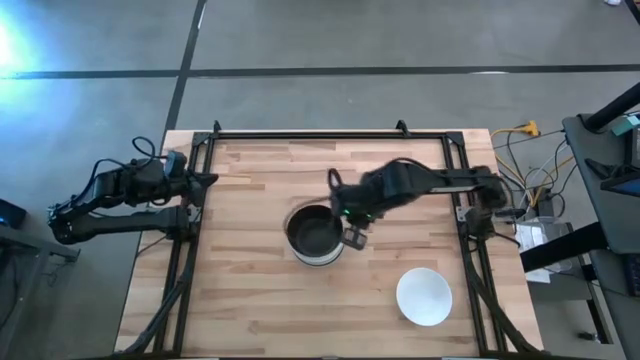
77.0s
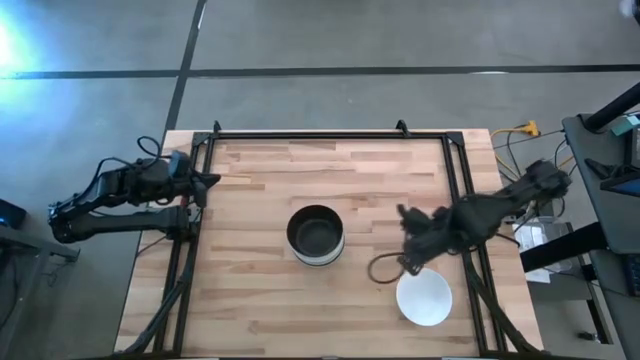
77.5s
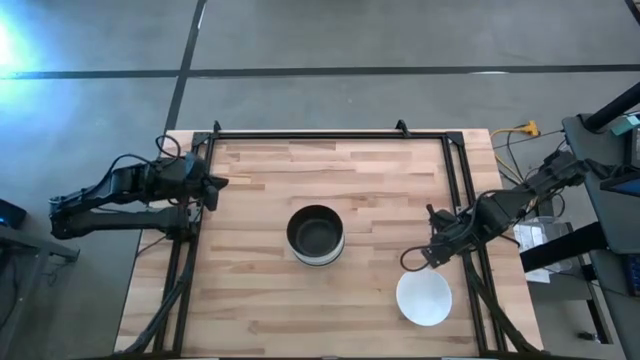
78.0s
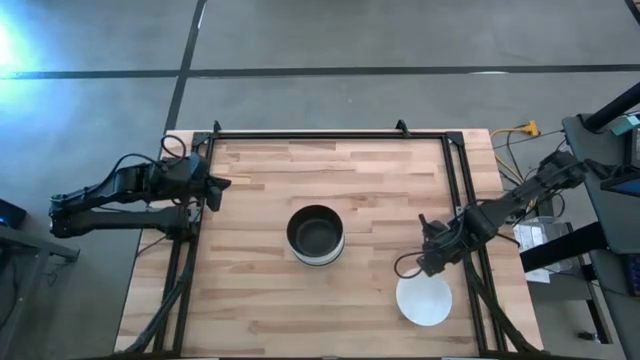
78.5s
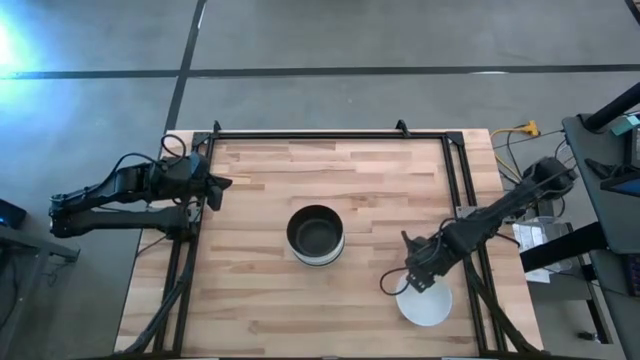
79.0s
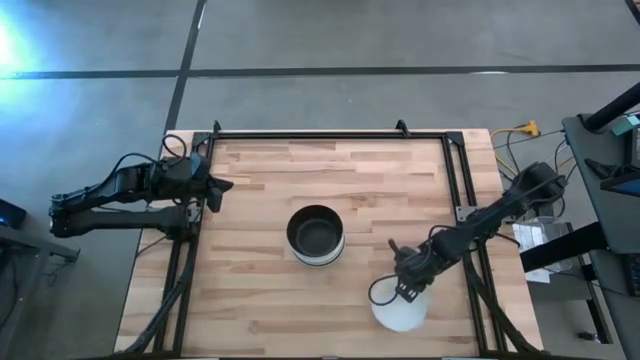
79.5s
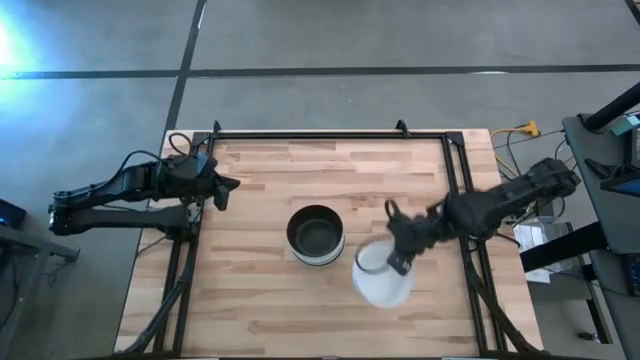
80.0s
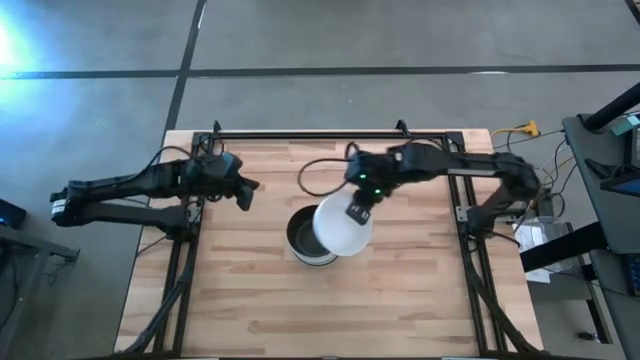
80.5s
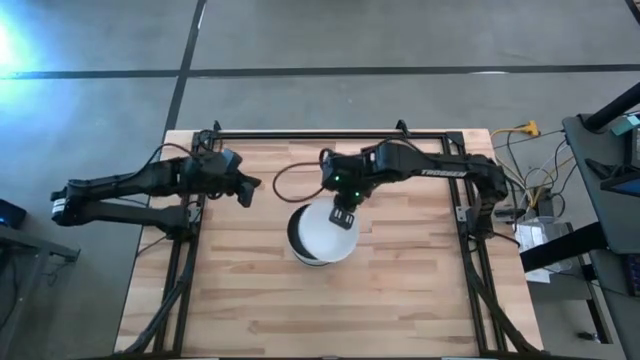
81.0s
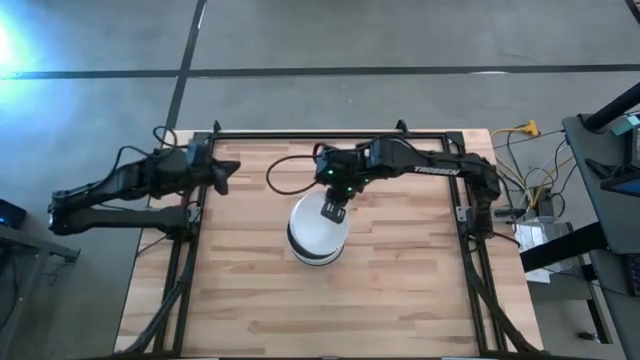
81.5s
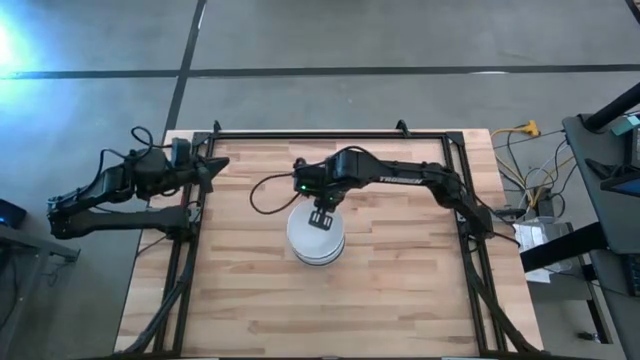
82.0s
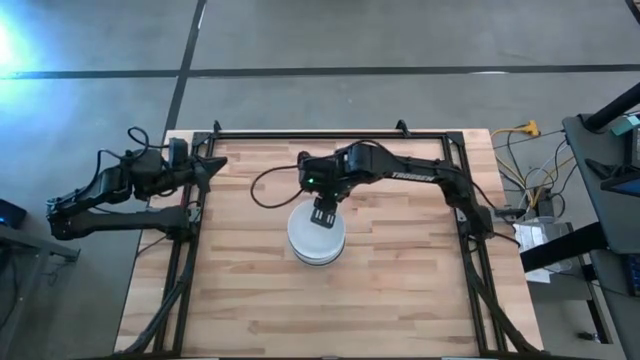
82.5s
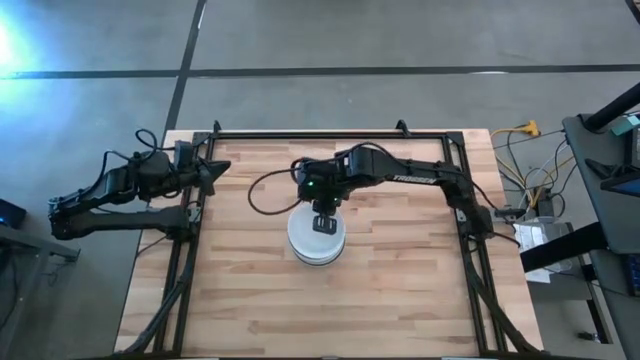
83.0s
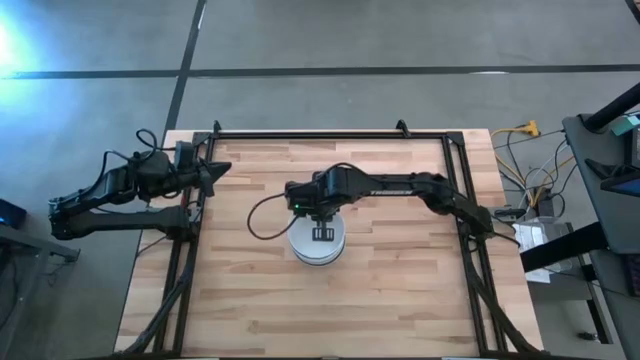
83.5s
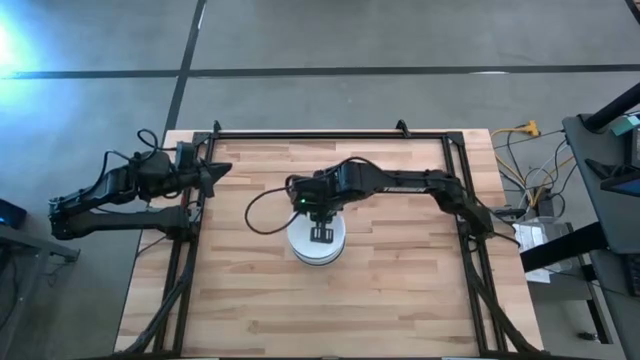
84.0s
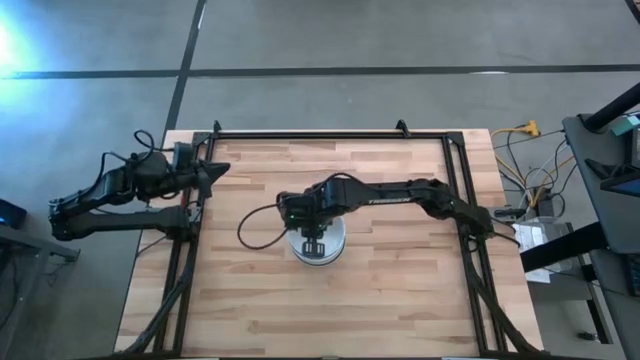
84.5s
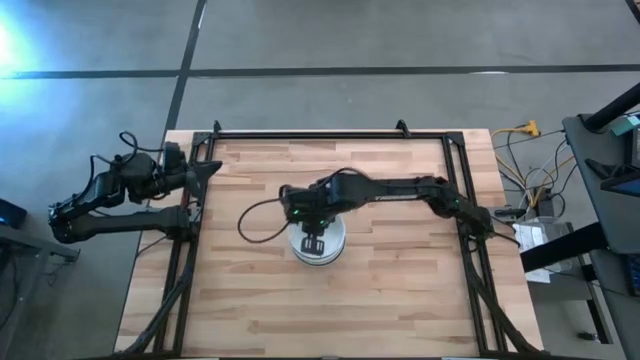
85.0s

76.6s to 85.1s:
Task: Nest bowls inside each other
Stack the white bowl on top of the other white bowl

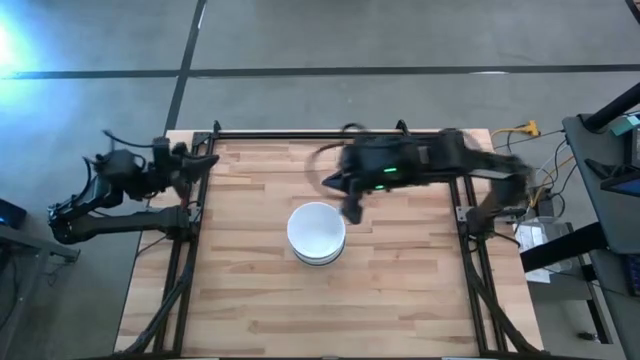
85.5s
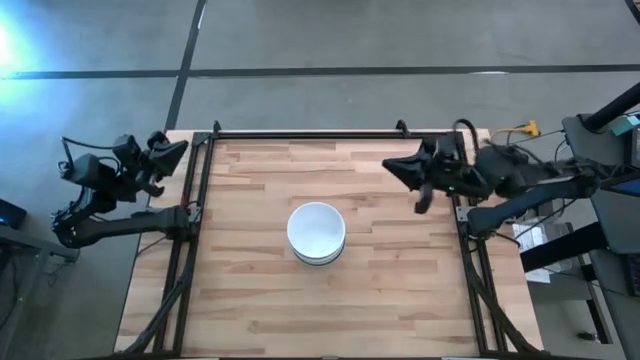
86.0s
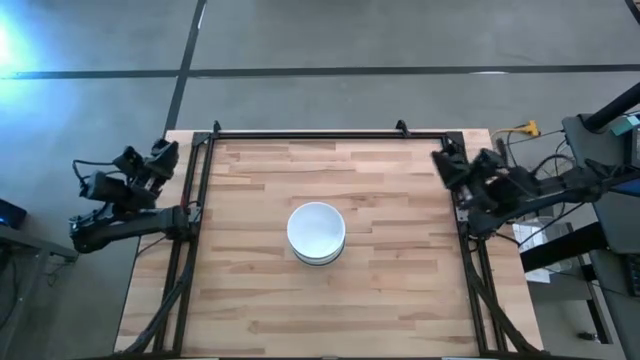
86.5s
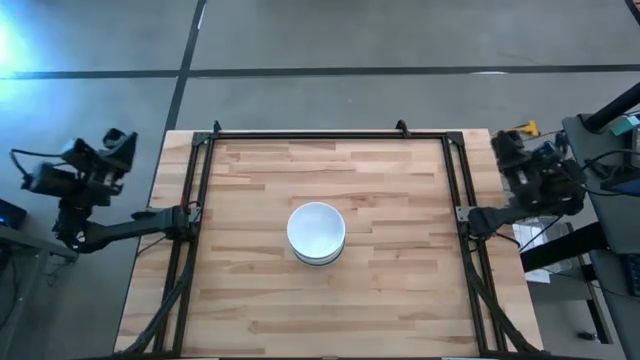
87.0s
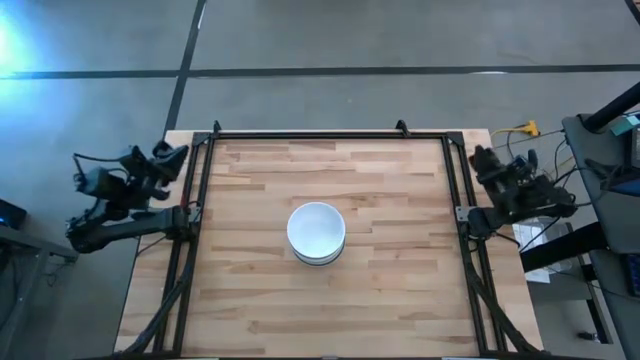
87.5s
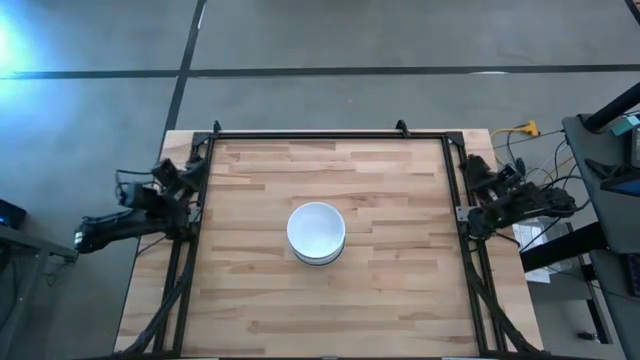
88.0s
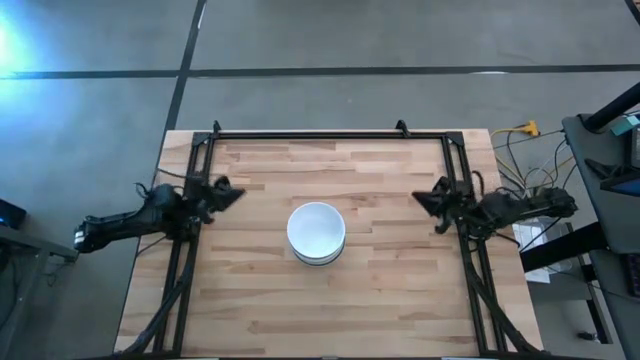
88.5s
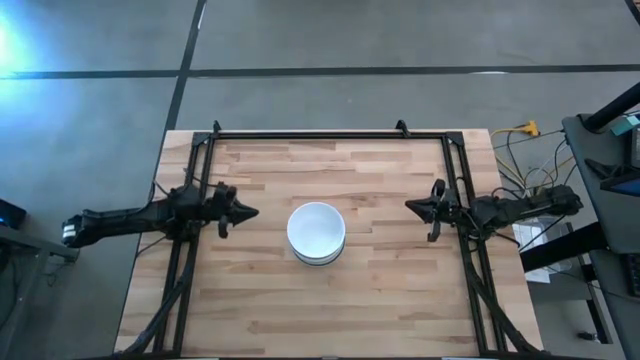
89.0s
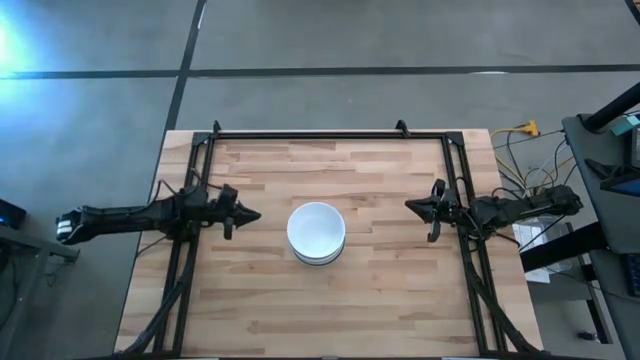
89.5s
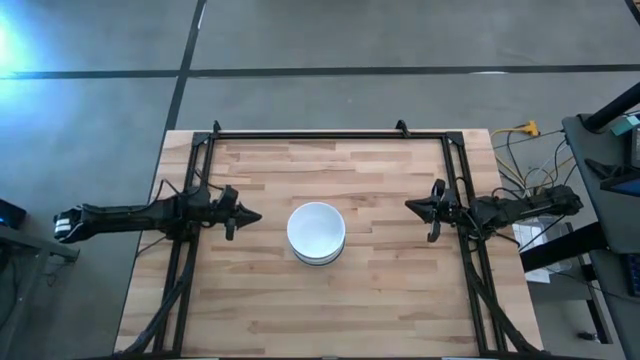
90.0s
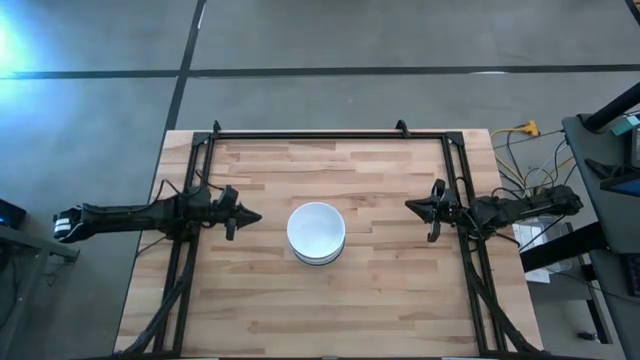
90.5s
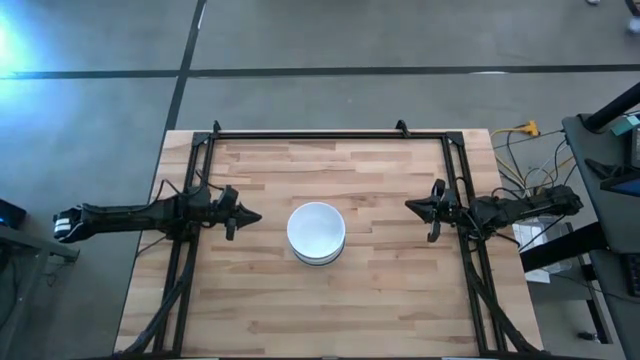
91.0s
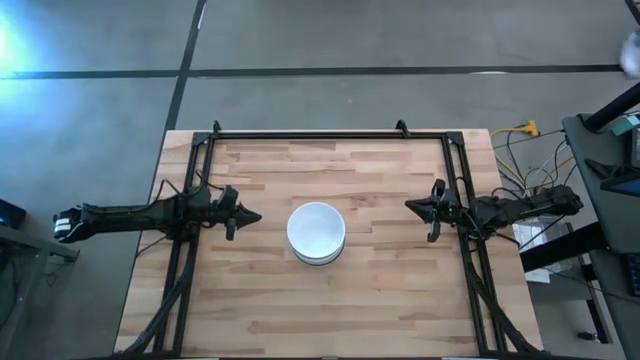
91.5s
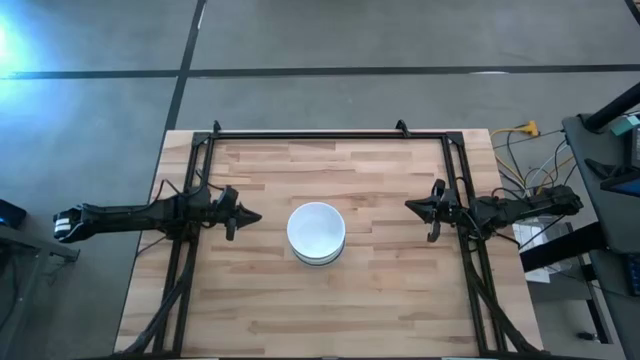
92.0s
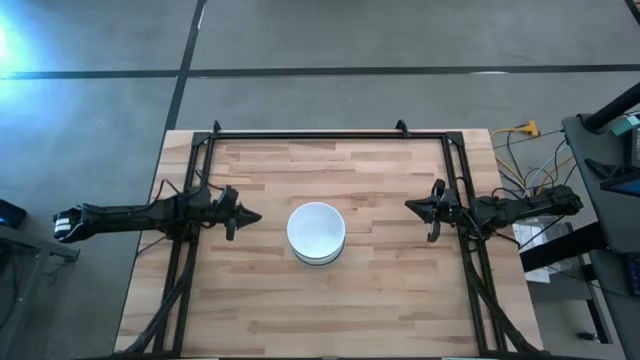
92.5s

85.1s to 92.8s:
Return to Home Position

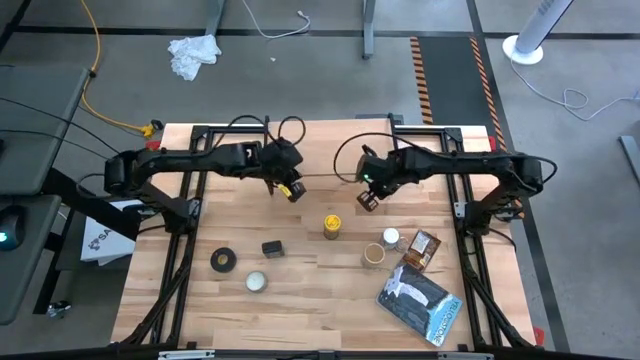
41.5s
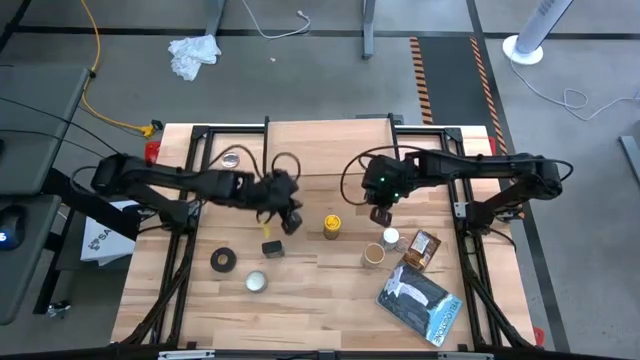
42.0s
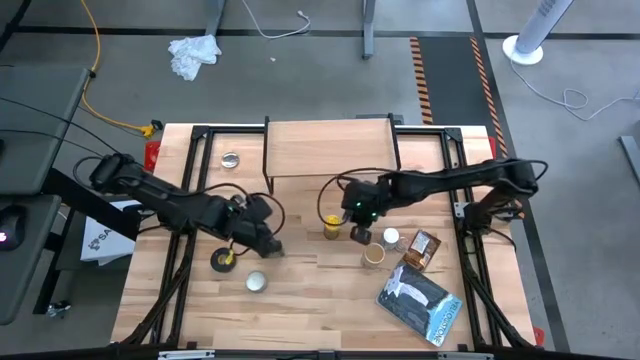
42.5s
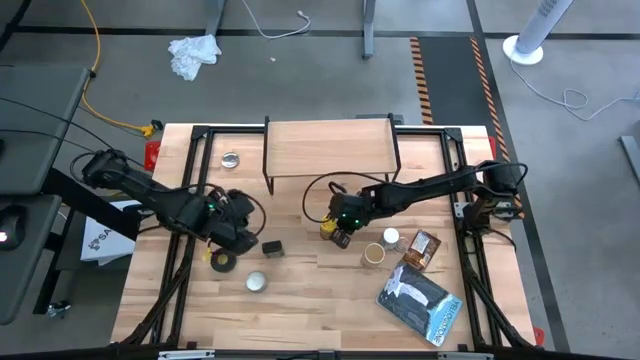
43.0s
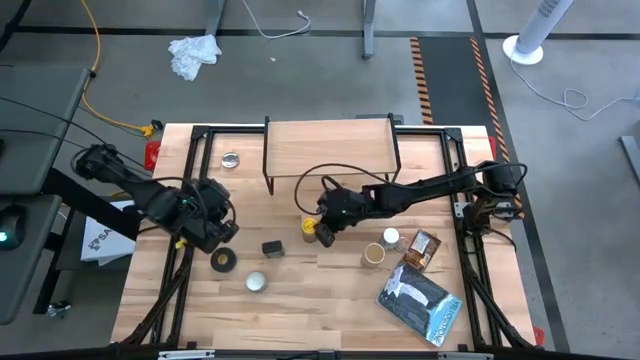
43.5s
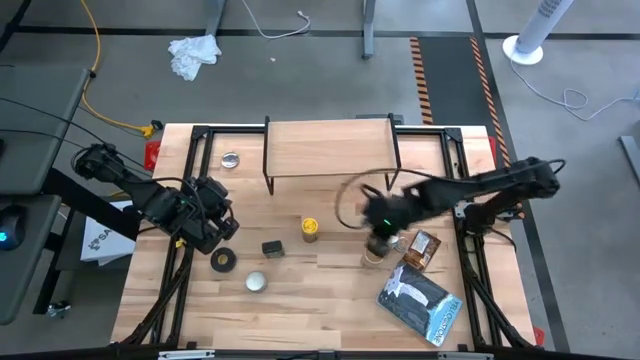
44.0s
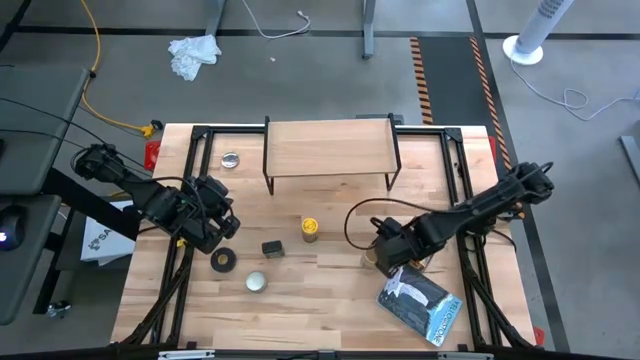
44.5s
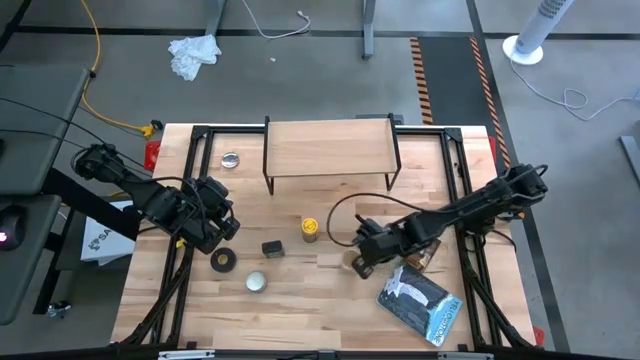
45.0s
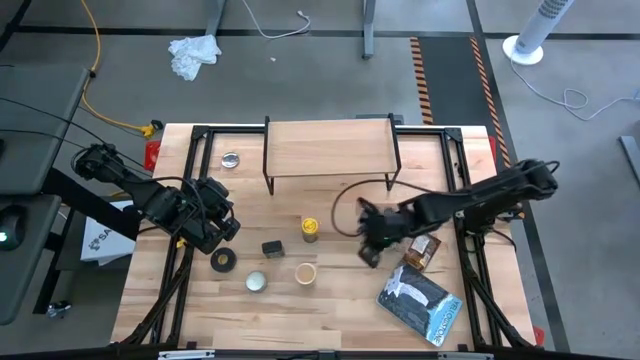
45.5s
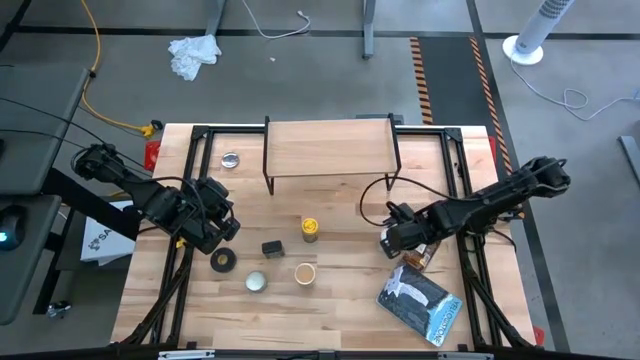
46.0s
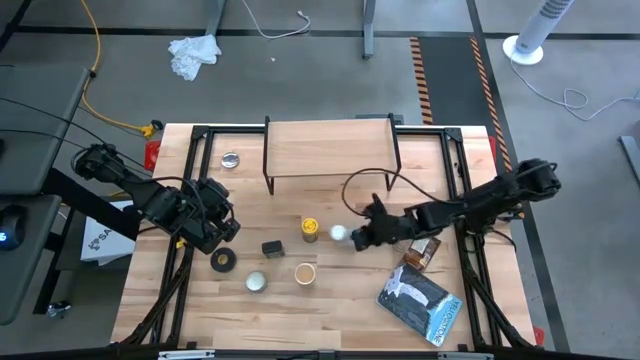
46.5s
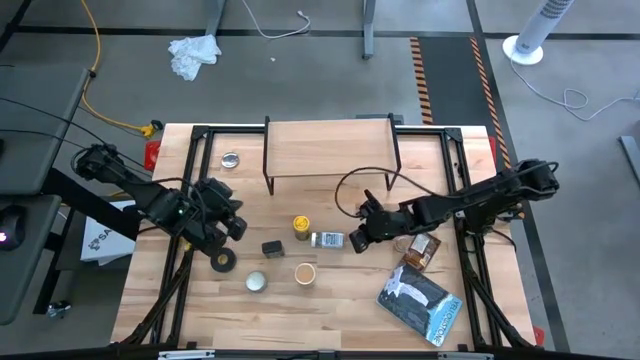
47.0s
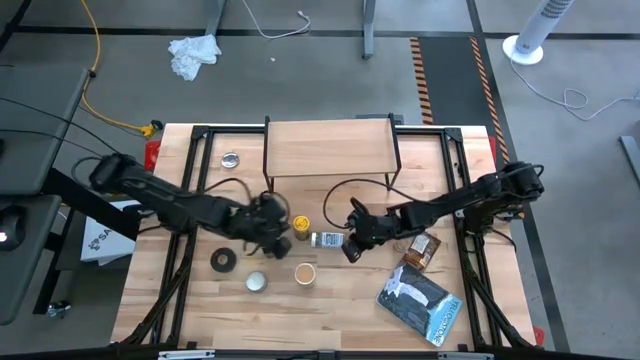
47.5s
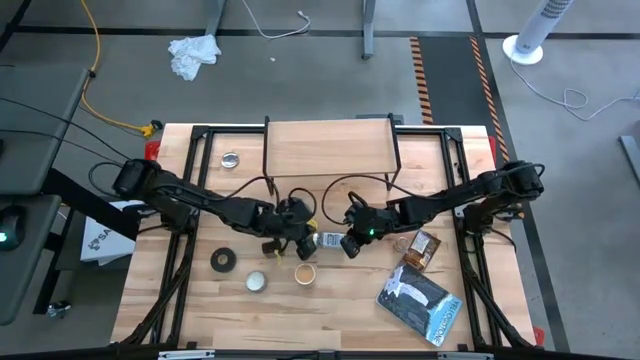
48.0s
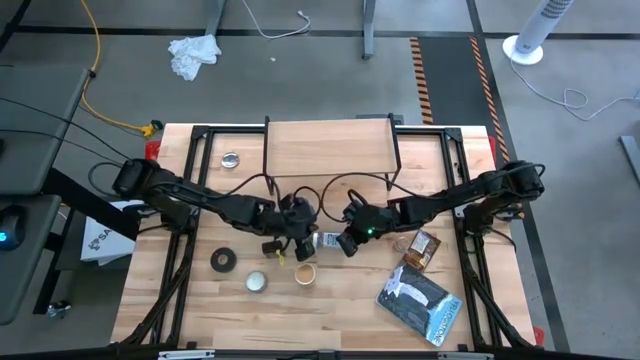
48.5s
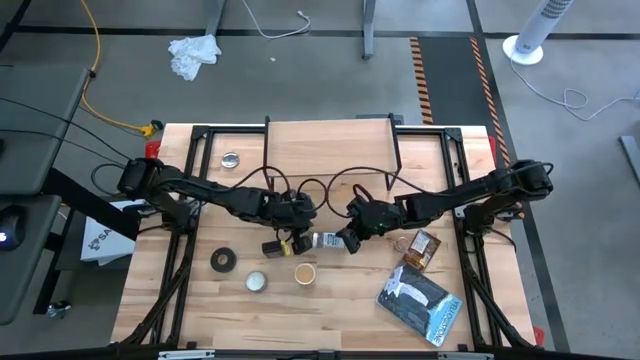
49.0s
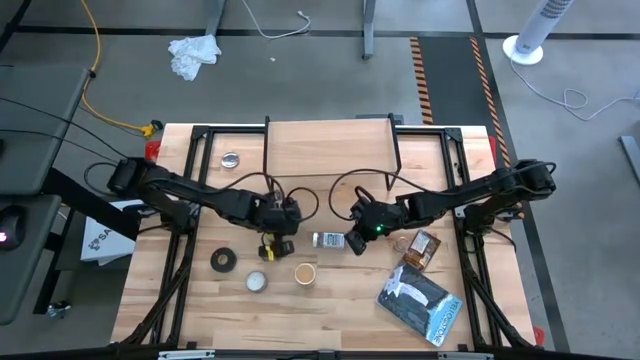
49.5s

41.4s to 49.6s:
Task: Shelf spices
Adjust the seasoning bottles
